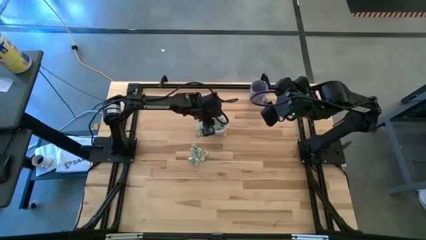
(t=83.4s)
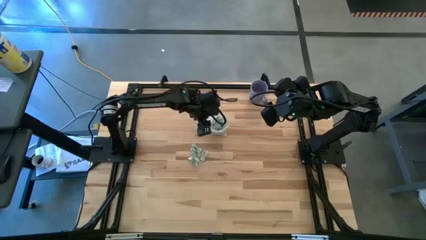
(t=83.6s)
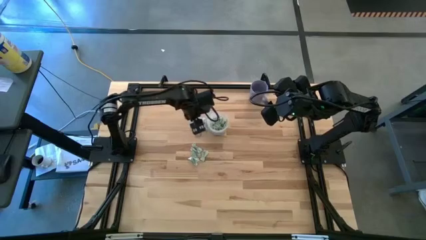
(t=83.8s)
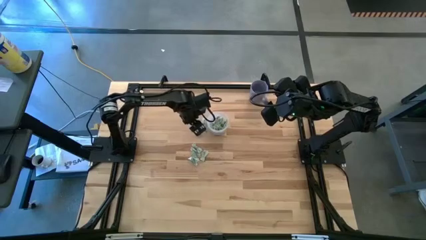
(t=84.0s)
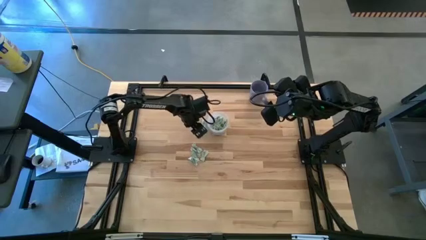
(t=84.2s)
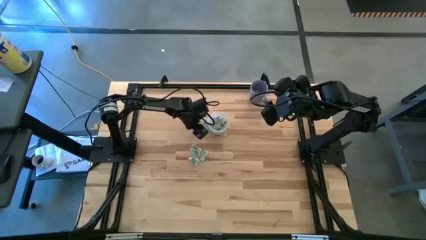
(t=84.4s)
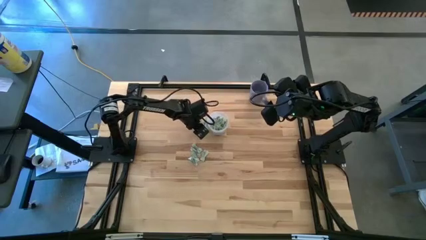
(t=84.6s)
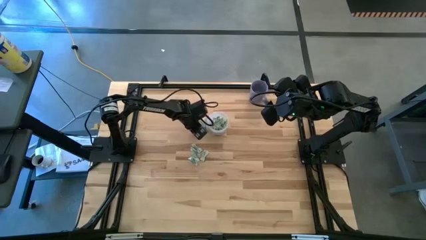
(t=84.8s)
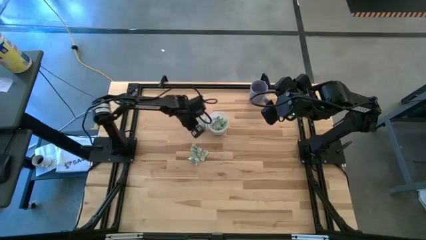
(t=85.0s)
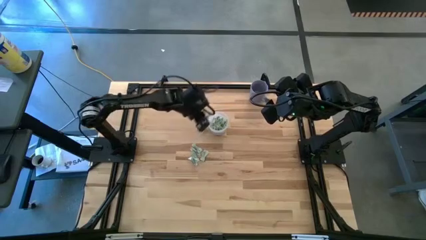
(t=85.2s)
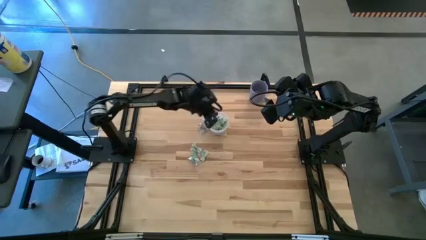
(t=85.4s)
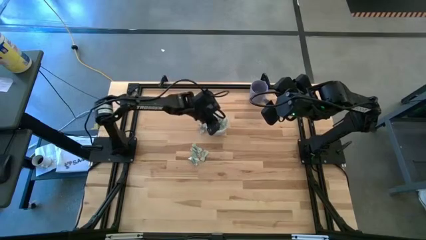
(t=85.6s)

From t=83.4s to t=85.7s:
Task: Pick and place Stevia / Truvia into bins
Put the stevia packet into the transparent container

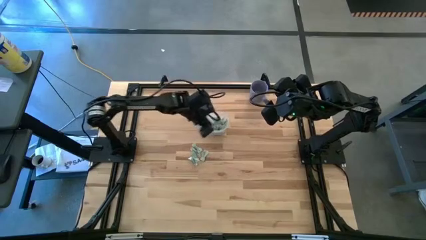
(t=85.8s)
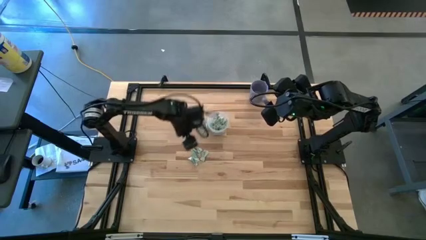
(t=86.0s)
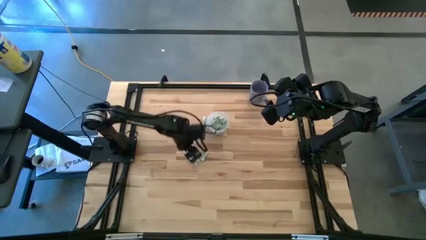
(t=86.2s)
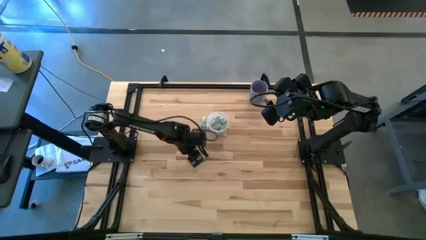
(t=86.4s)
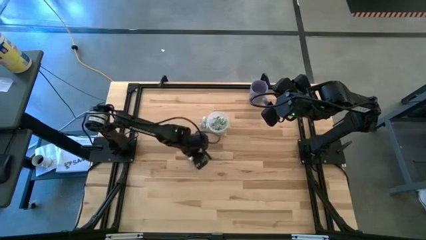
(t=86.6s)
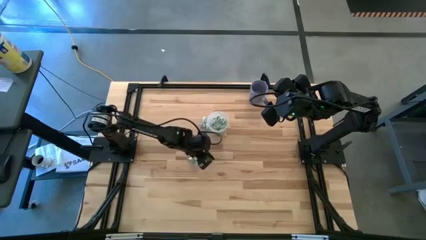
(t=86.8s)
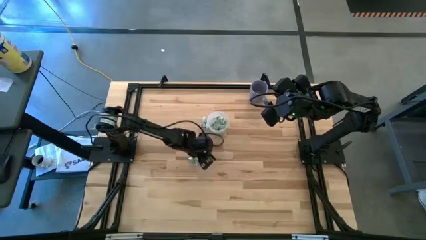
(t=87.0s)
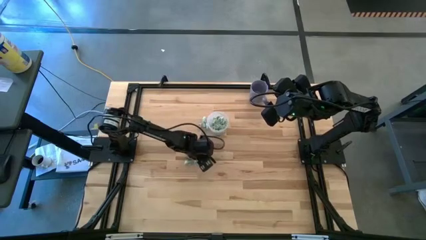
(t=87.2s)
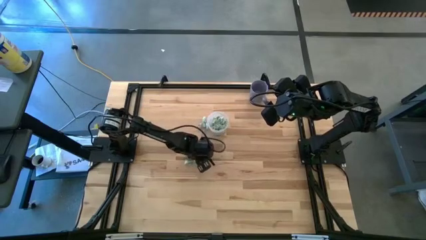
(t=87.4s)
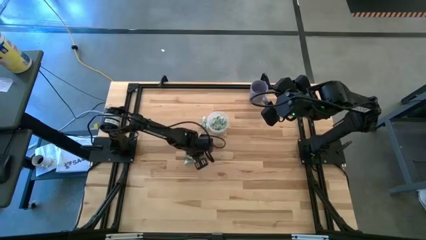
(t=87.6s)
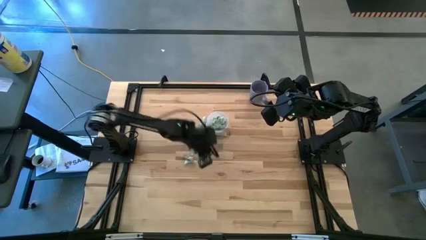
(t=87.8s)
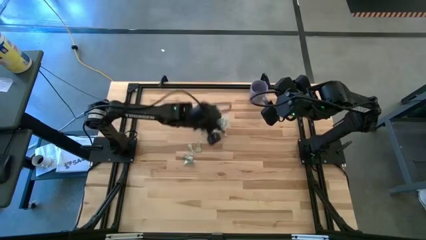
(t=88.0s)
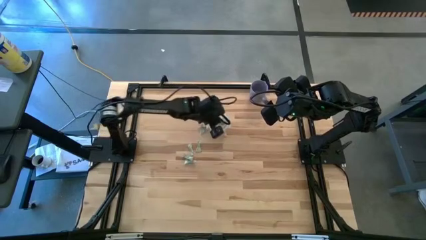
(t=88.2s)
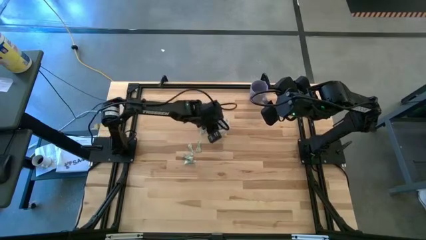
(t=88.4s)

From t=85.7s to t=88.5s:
Put the stevia packet into the transparent container

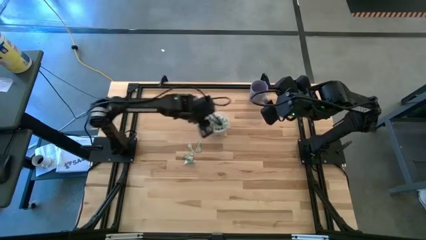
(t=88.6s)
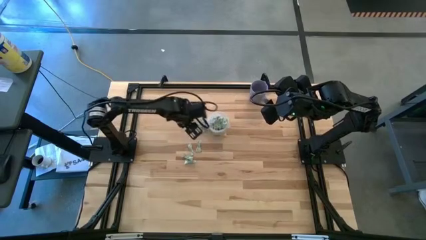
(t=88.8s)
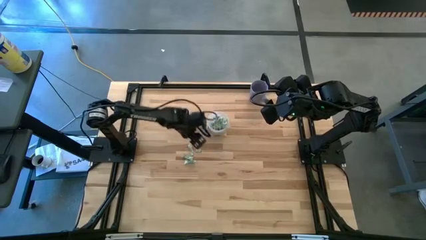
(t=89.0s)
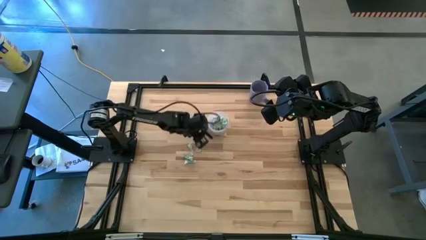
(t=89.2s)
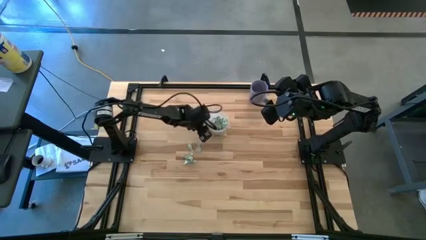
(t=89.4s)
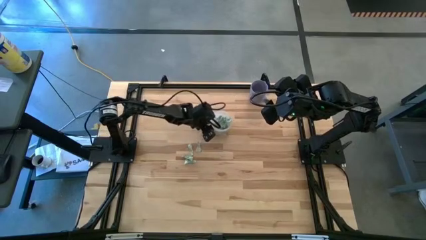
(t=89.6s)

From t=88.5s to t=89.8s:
Adjust the transparent container

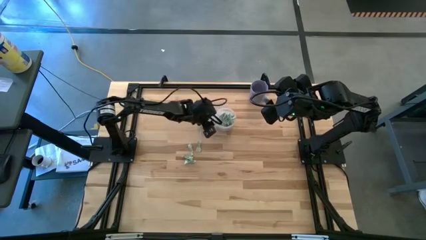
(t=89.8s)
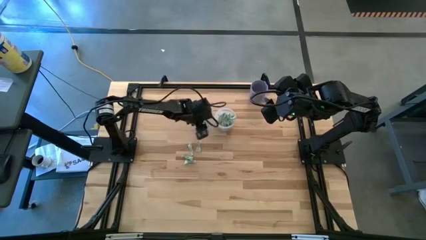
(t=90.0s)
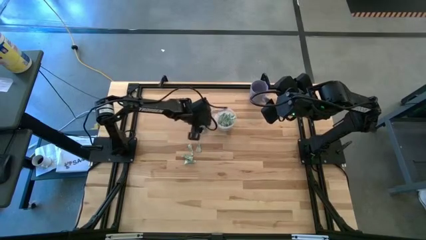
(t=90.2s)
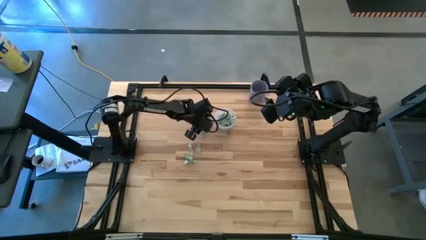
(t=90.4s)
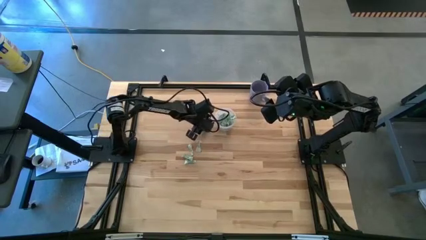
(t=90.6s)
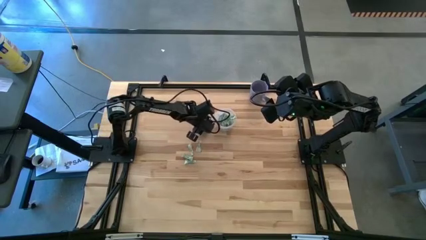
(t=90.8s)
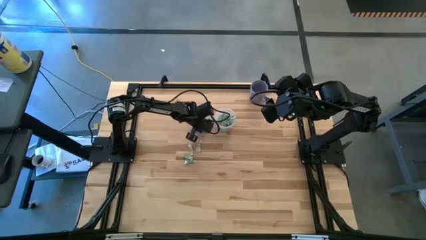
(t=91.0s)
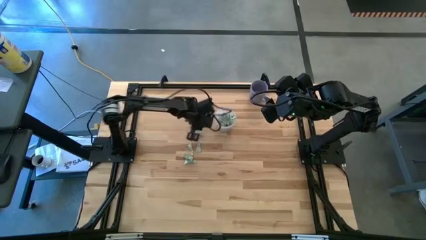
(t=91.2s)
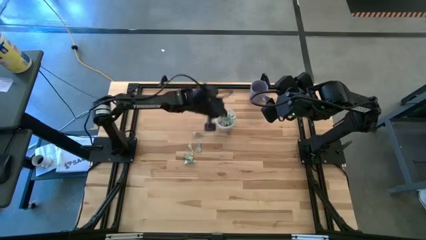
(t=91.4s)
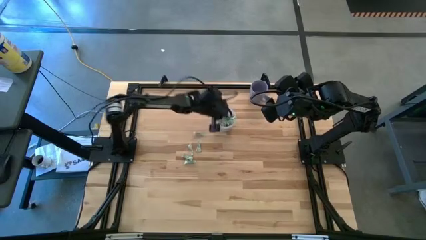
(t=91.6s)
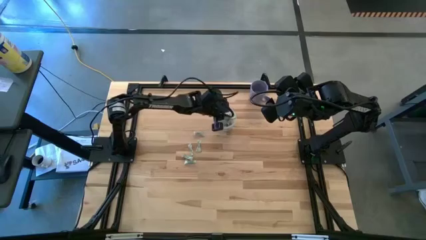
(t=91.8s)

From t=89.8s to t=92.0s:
Put the stevia packet into the transparent container

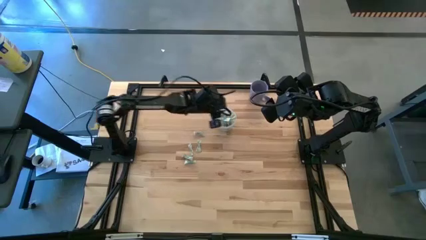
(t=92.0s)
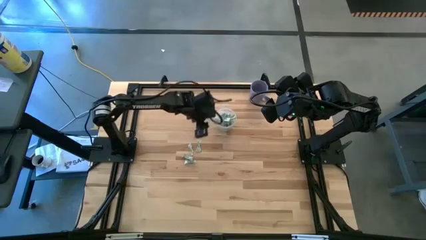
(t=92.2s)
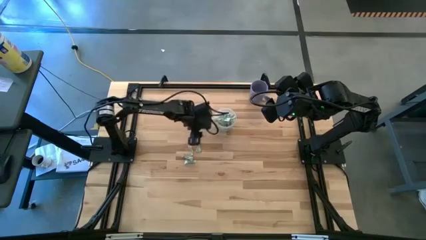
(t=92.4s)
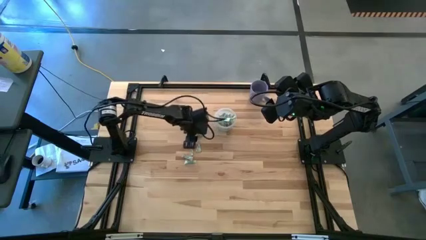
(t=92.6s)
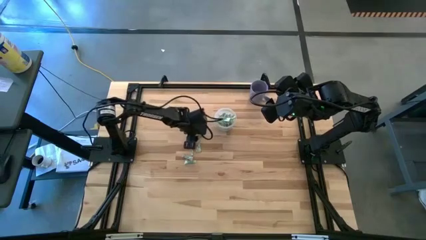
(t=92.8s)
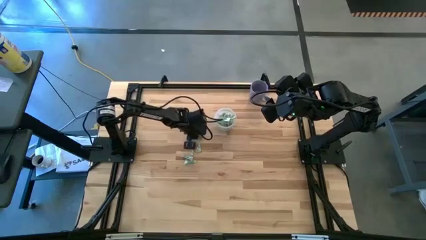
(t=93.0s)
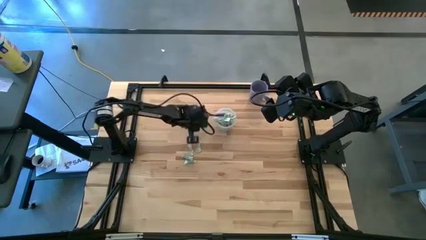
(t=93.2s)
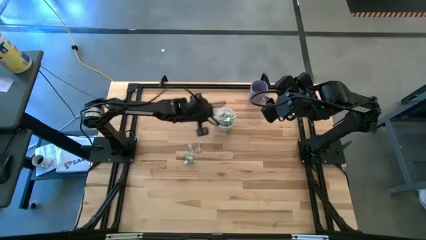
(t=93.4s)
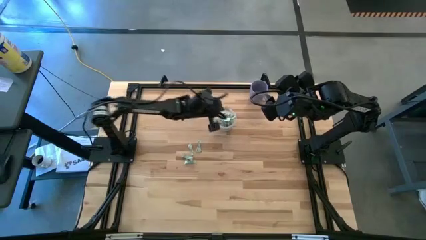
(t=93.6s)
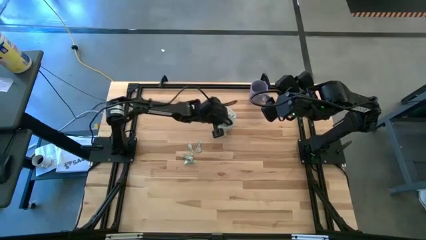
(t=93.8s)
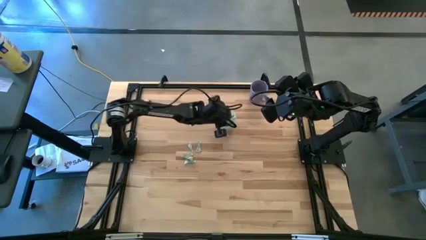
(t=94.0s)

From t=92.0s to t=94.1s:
Put the stevia packet into the transparent container

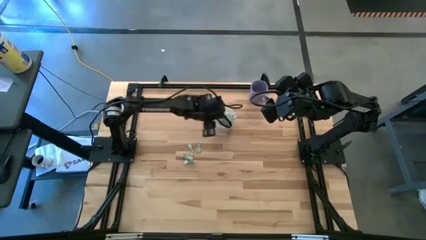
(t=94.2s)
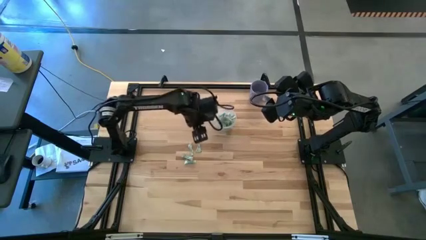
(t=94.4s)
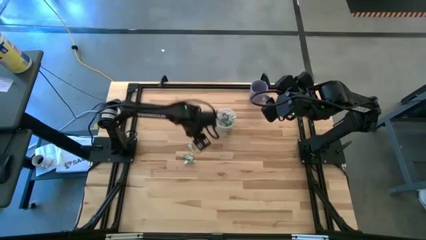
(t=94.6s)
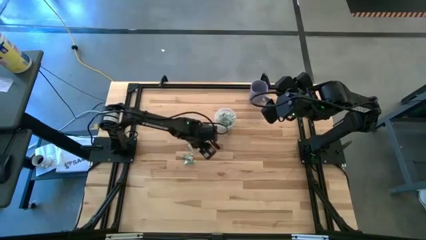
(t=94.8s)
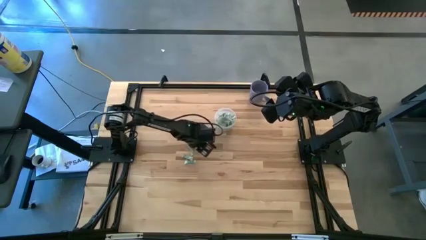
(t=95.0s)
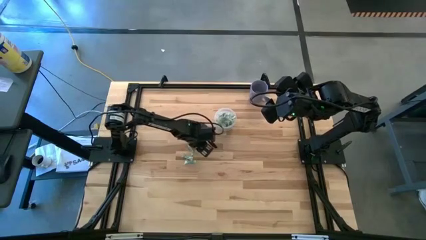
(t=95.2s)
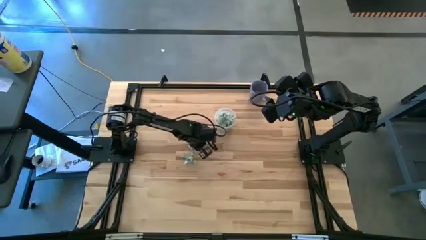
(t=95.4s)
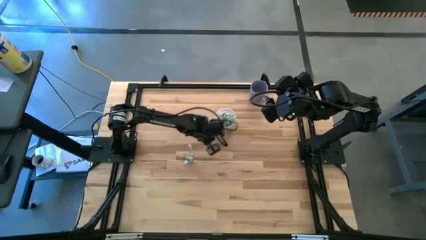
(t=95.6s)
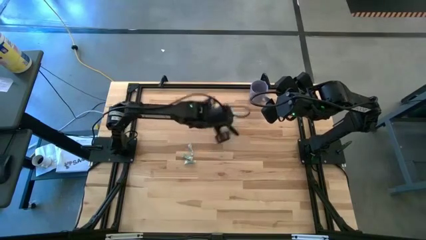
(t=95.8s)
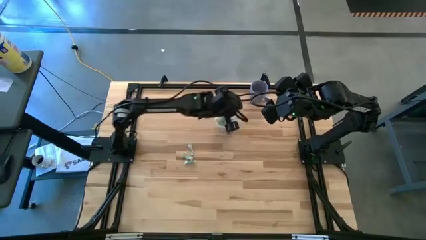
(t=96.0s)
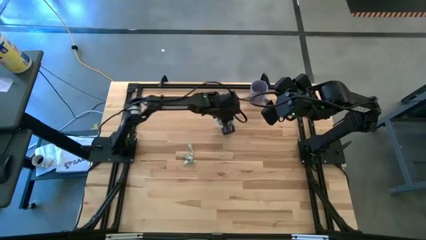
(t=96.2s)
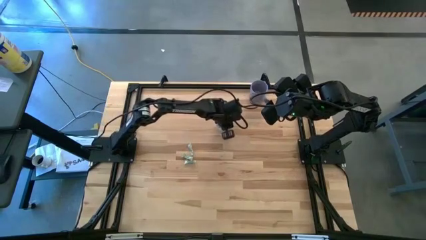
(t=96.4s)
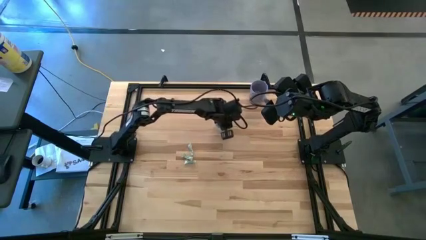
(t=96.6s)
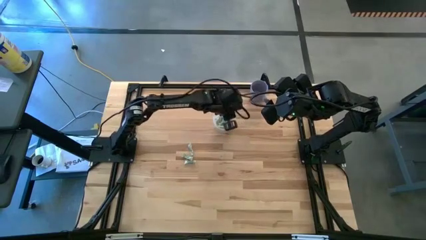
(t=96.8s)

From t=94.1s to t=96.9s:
Put the stevia packet into the transparent container

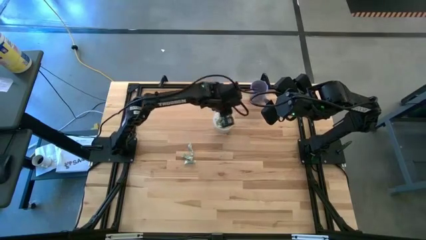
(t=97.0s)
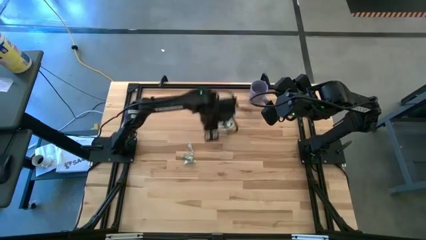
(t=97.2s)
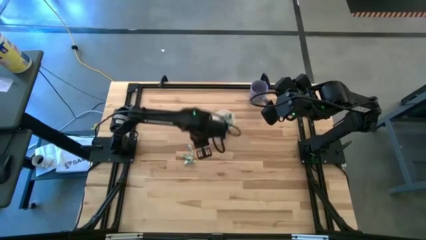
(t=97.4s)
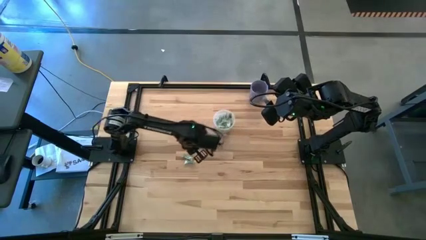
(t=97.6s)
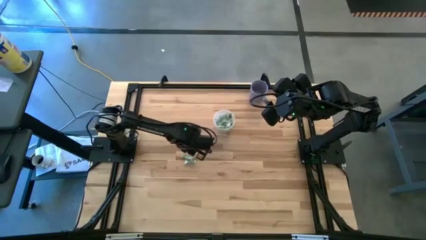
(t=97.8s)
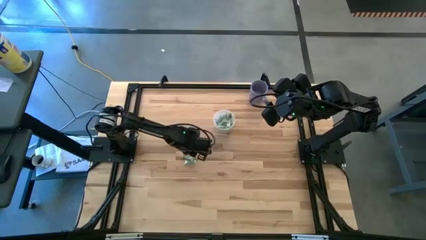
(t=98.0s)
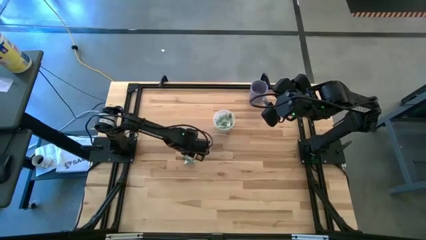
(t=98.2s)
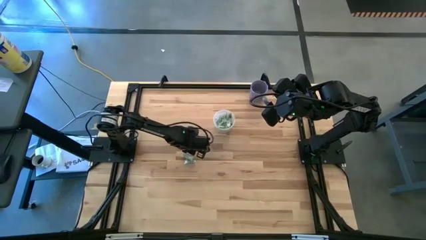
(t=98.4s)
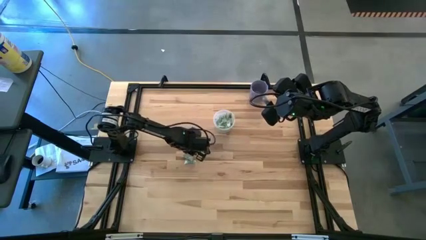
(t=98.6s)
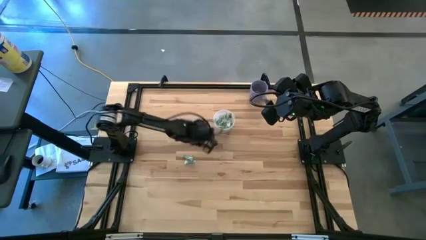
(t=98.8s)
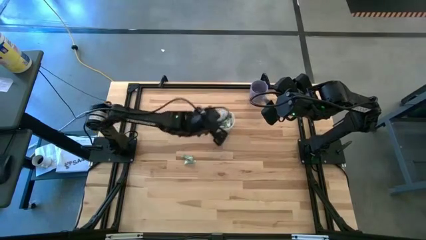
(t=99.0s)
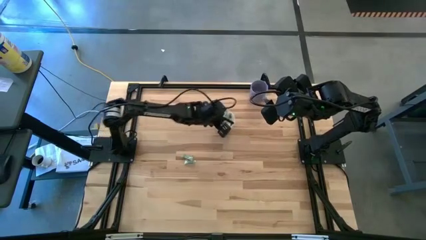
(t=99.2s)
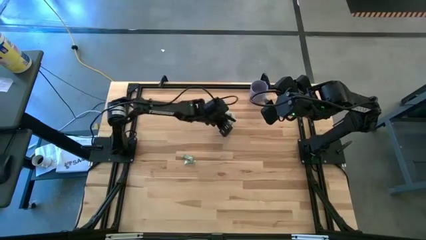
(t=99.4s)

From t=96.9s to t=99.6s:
Put the stevia packet into the transparent container

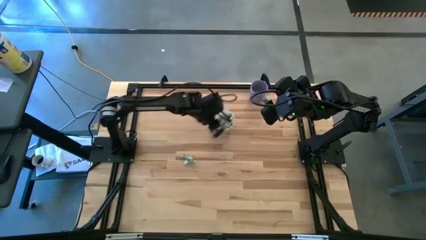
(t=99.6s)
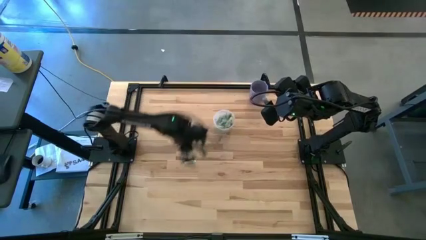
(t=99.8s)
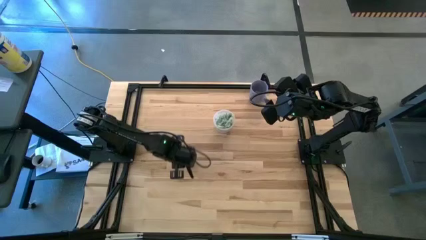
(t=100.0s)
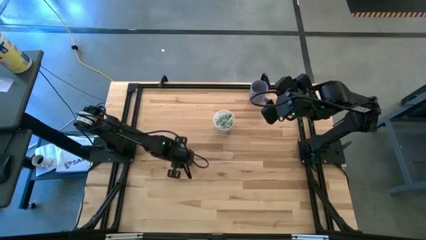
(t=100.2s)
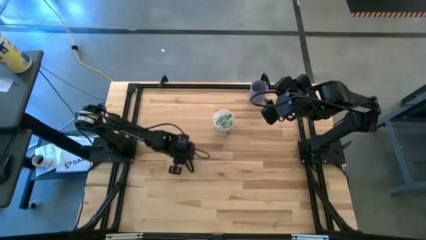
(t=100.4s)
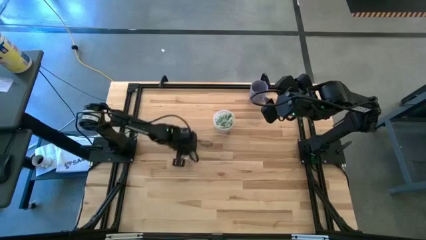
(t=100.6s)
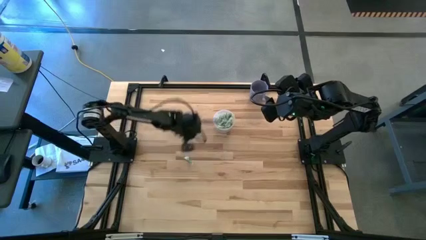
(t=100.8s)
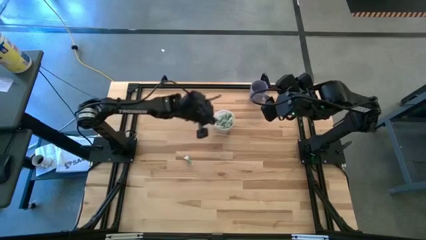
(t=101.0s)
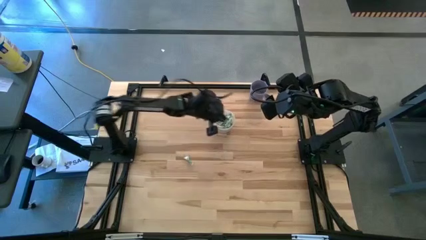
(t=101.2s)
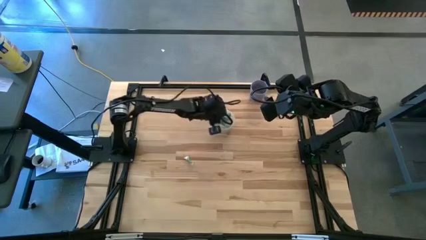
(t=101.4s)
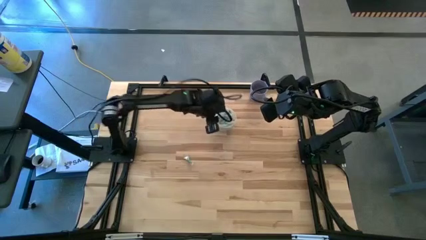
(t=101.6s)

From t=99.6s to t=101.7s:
Put the stevia packet into the transparent container
